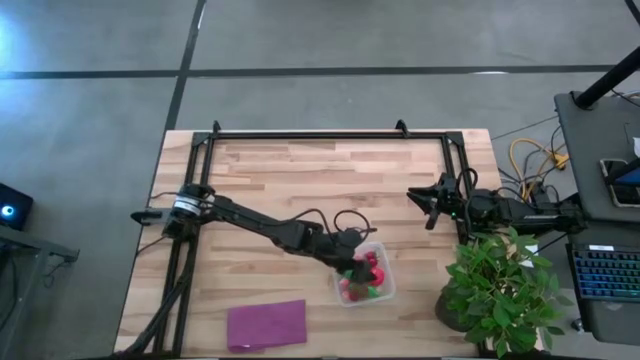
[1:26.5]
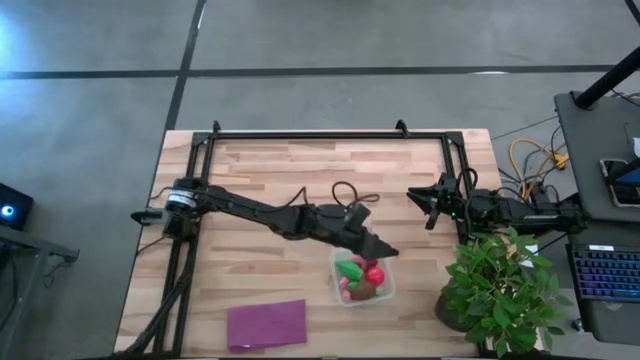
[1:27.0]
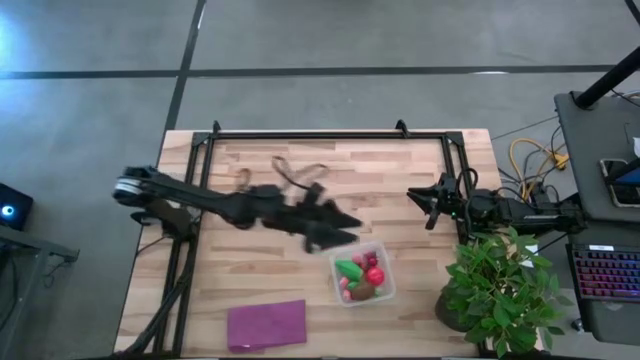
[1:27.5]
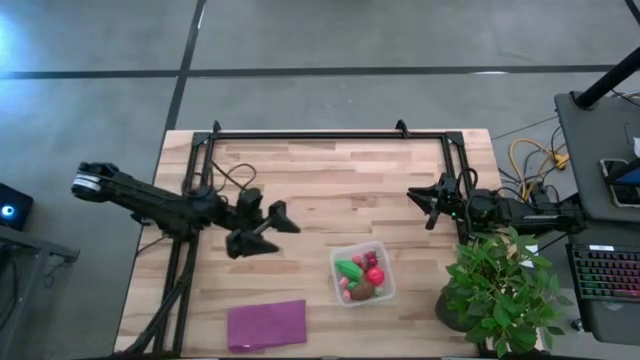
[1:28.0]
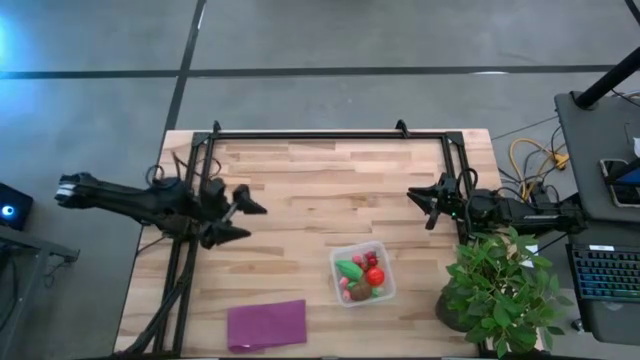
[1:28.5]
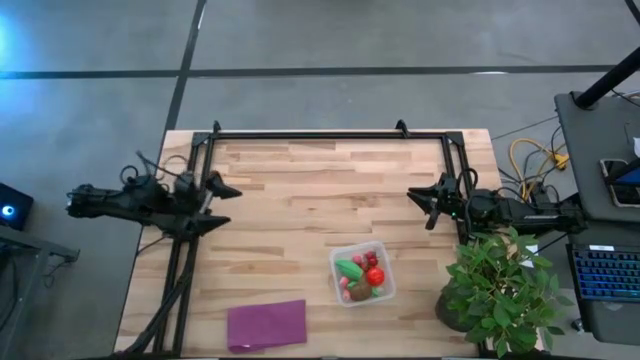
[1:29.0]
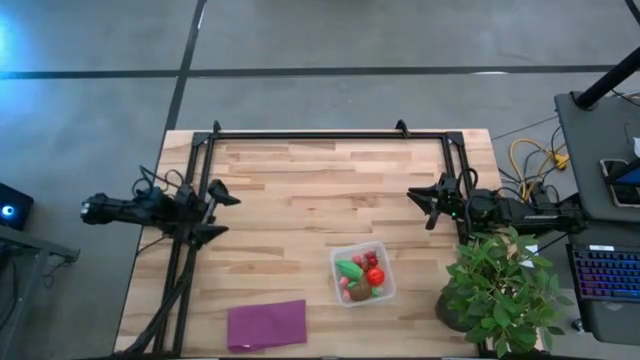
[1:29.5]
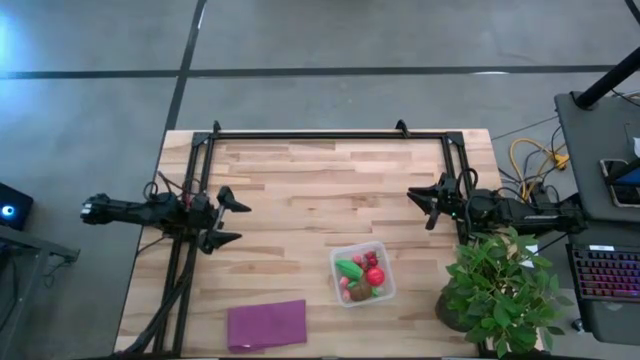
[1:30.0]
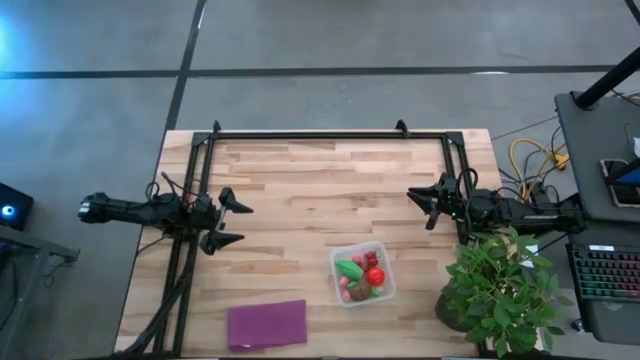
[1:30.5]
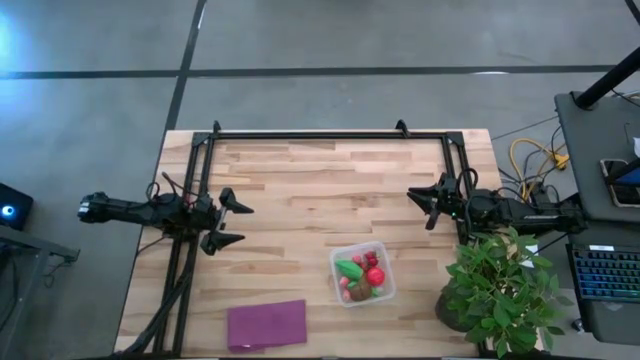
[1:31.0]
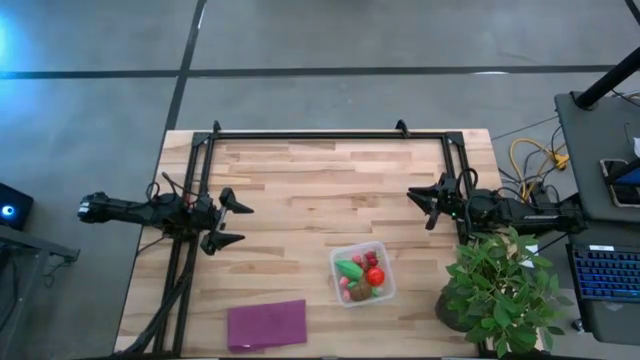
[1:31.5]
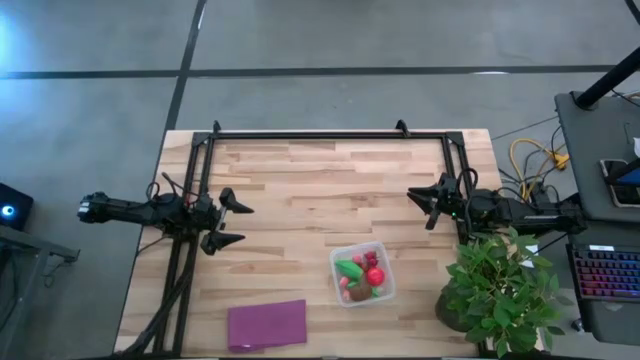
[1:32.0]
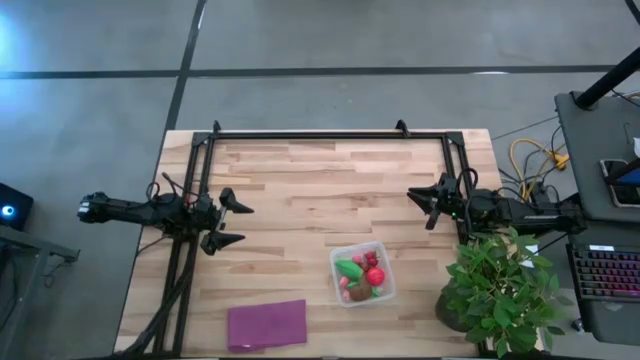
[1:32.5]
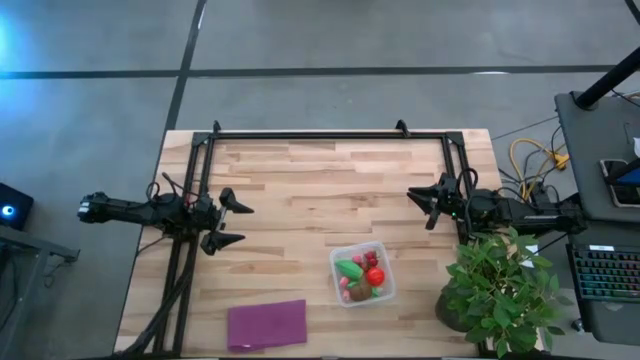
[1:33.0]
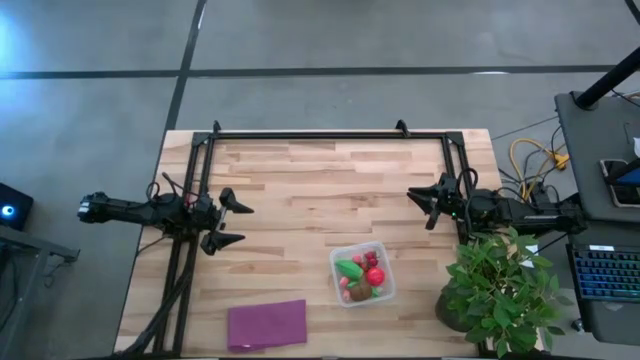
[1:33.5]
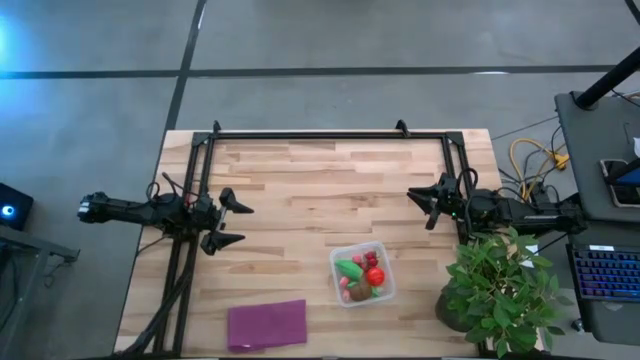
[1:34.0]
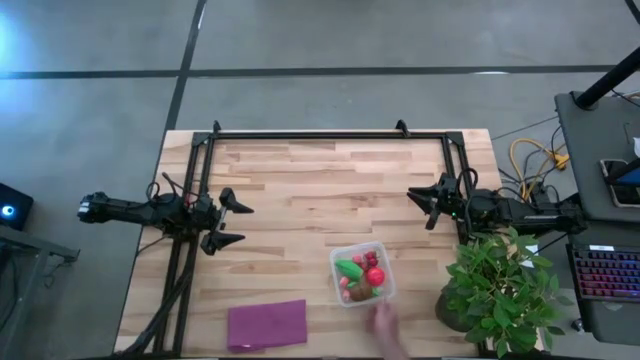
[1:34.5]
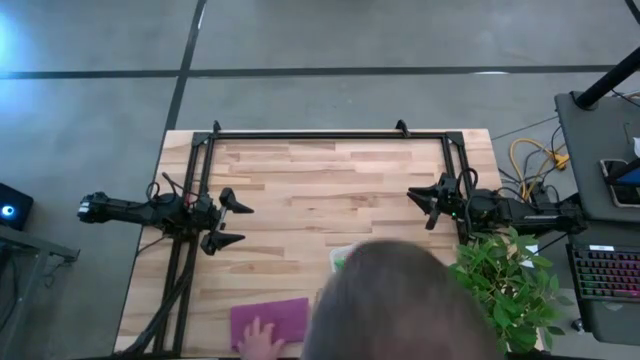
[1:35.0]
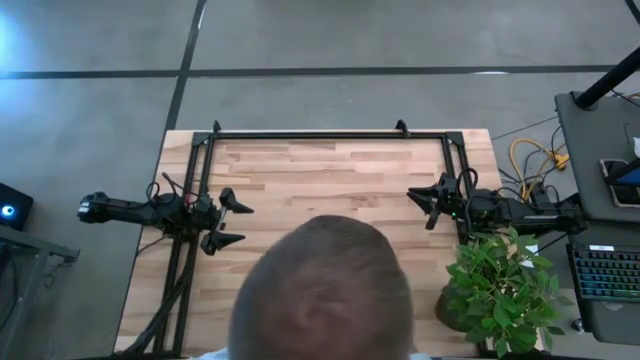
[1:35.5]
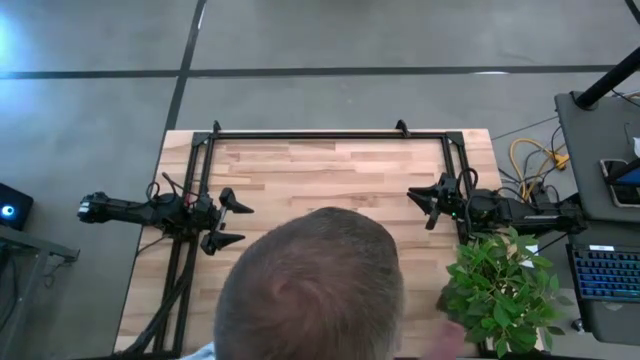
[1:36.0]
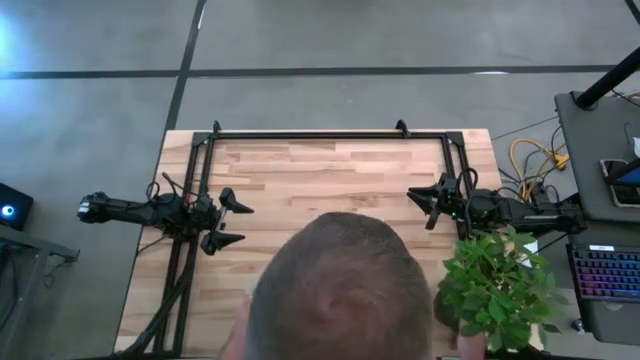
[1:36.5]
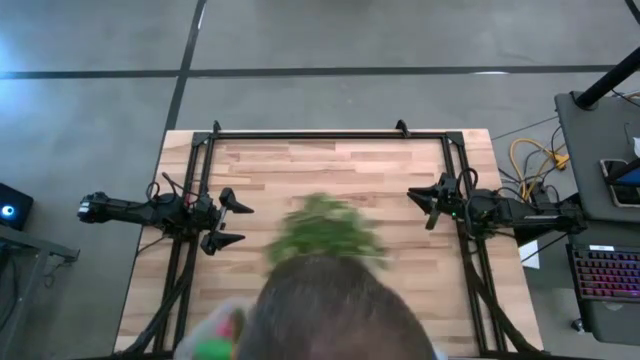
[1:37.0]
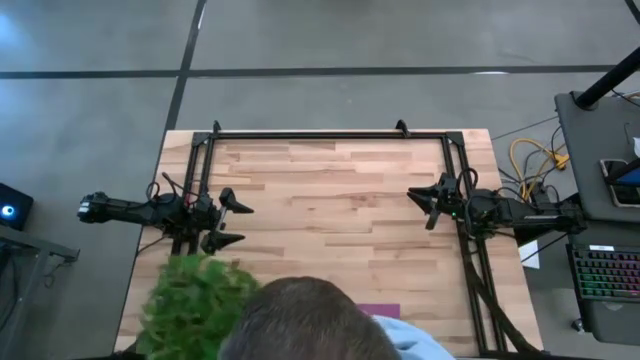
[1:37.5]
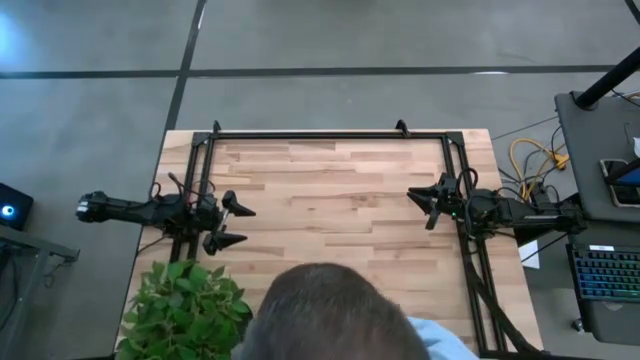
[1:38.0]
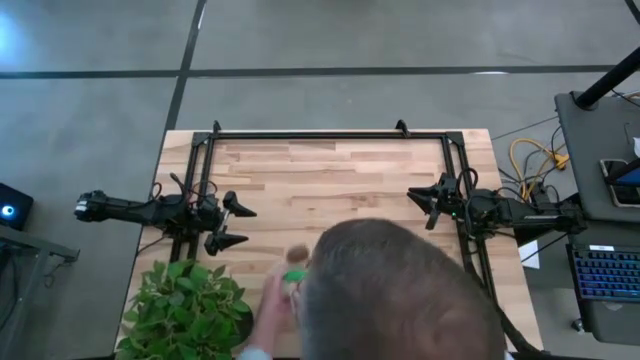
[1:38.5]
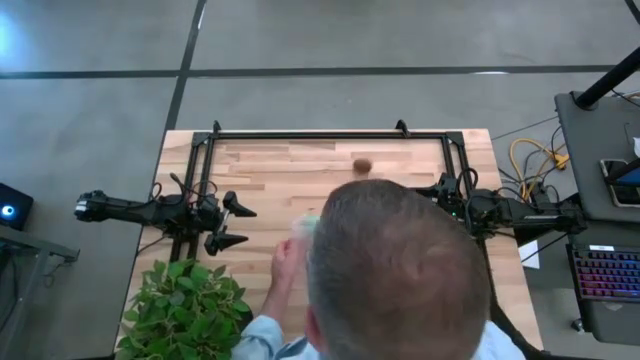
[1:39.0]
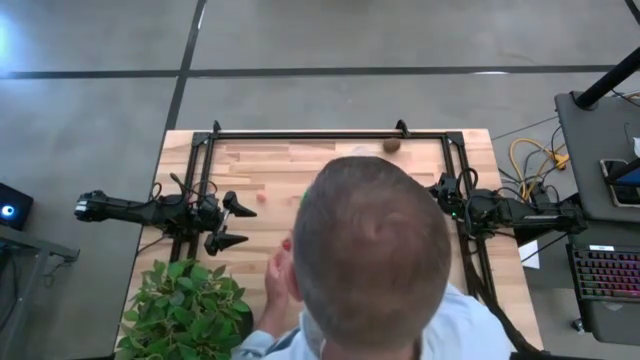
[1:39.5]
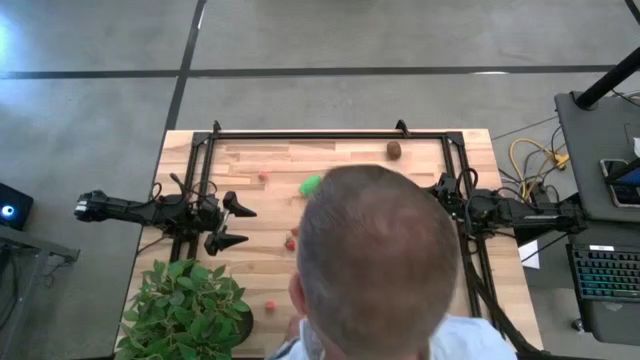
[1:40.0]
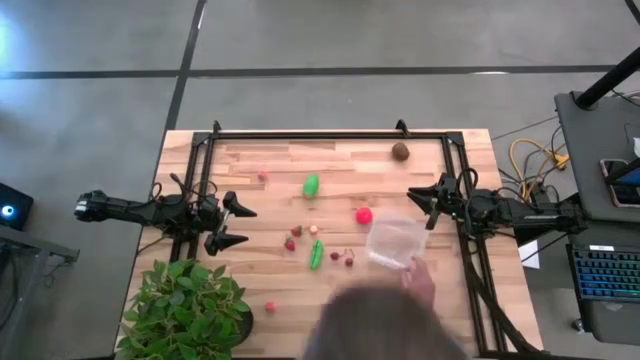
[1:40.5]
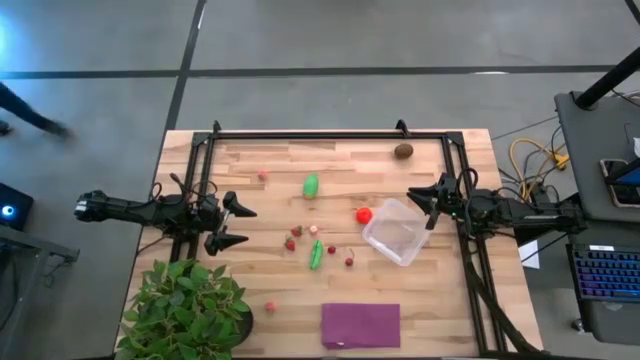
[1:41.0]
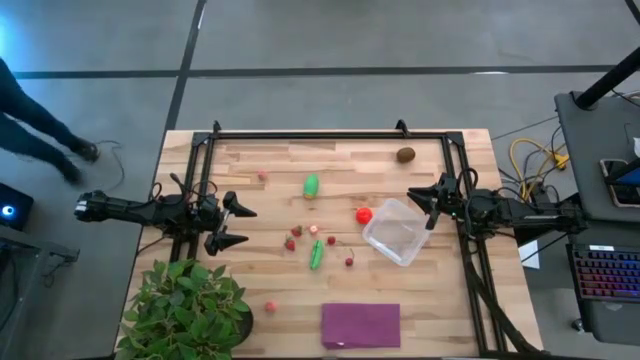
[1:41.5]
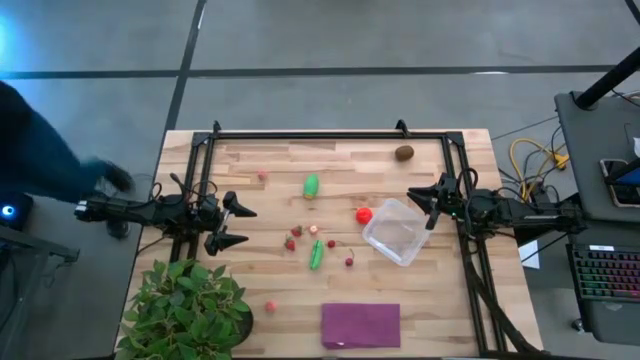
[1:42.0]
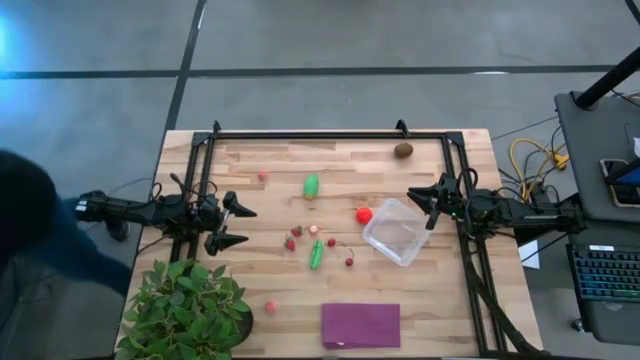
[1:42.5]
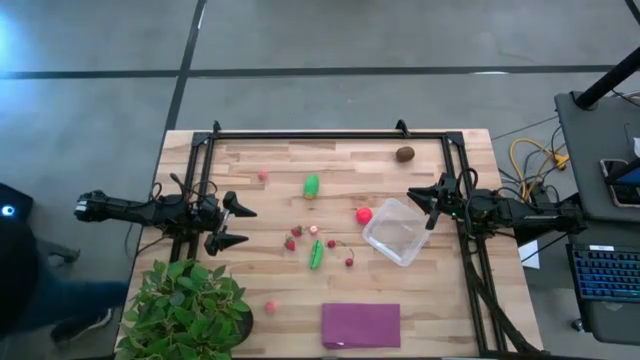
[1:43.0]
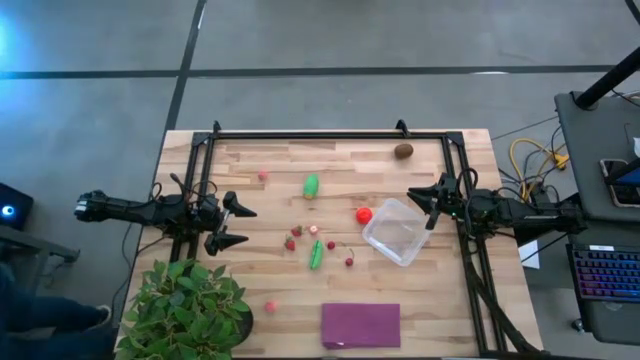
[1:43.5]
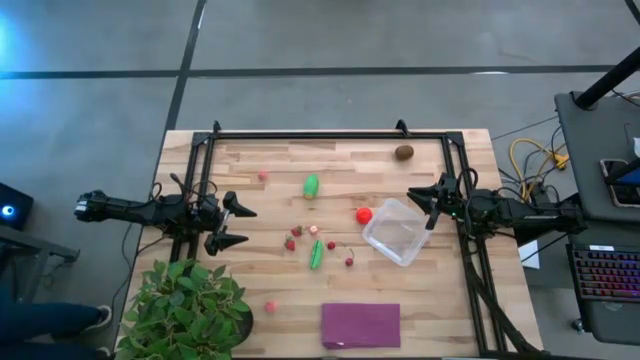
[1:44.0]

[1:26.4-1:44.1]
Task: Pick and placing Produce into tupperware
Return to Home Position

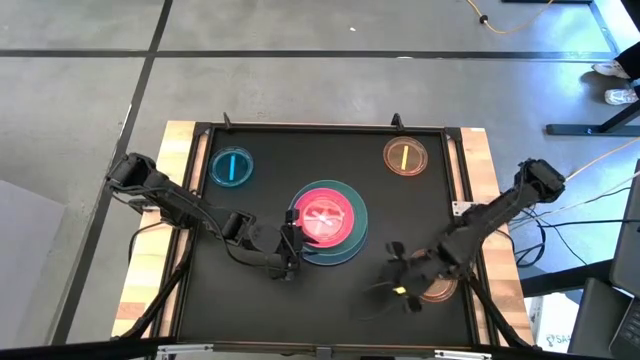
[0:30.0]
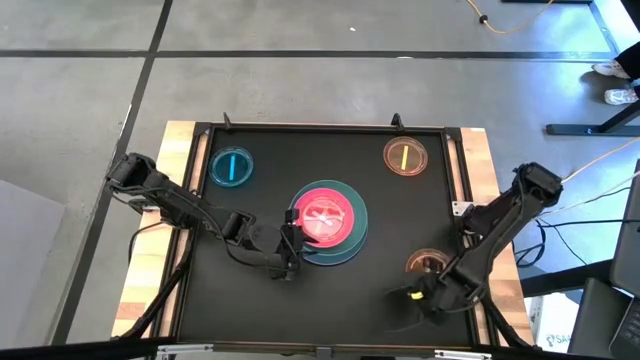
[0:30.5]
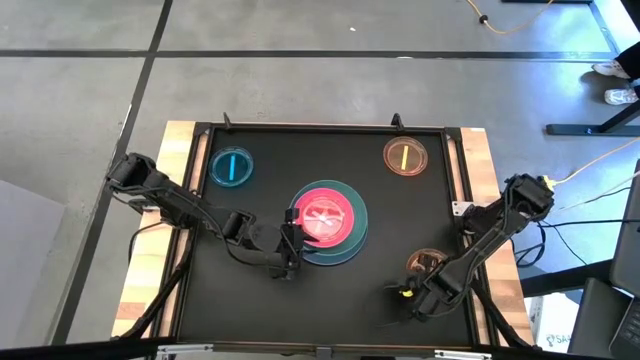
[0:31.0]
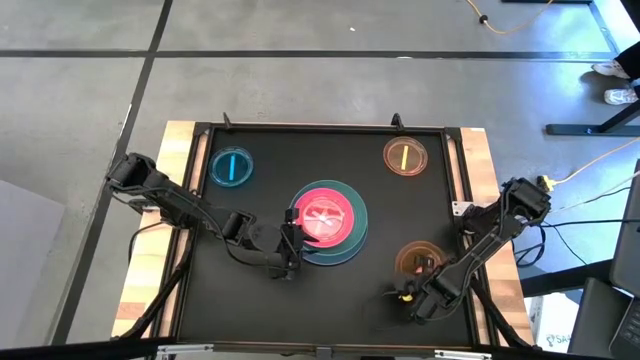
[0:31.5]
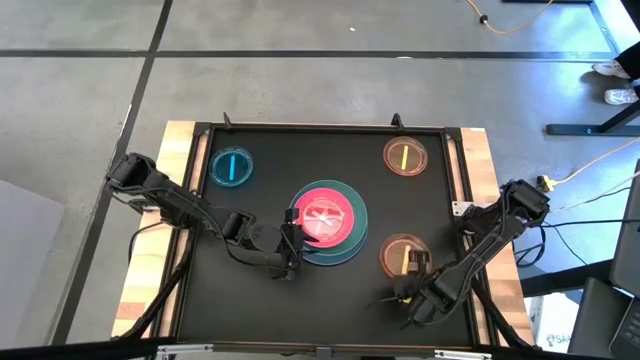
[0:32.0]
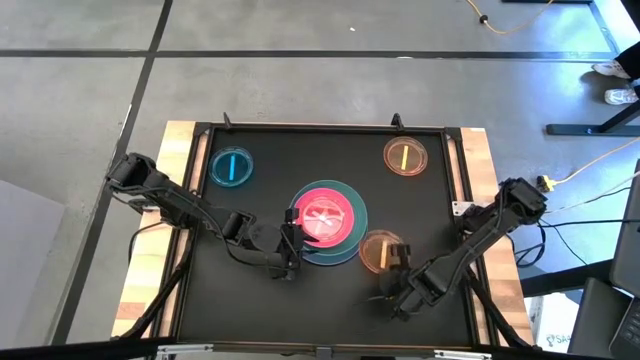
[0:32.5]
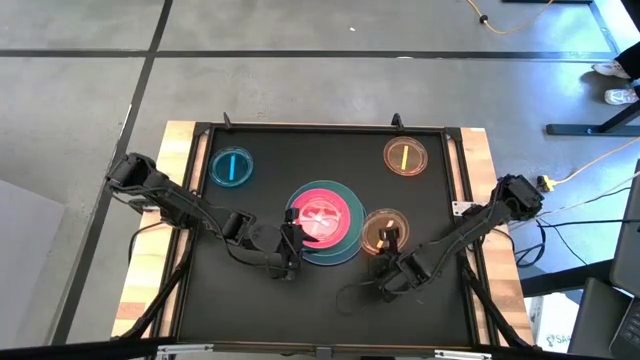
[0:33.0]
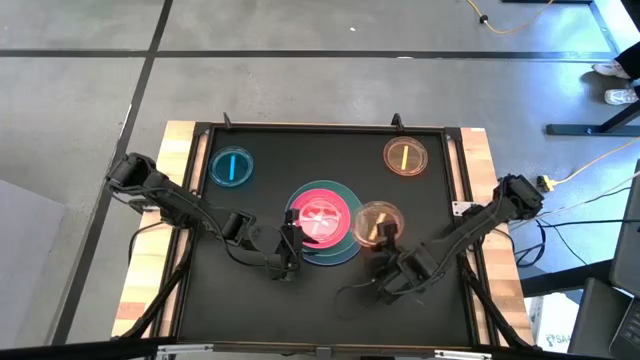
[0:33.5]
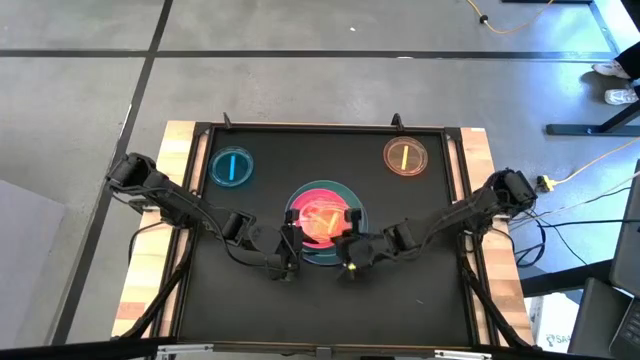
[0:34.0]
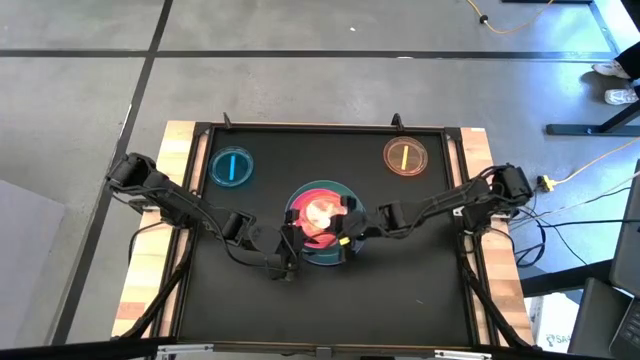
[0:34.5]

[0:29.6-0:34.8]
Task: Stack plastic plates
Stack the bottom light orange plate on the light pink plate
